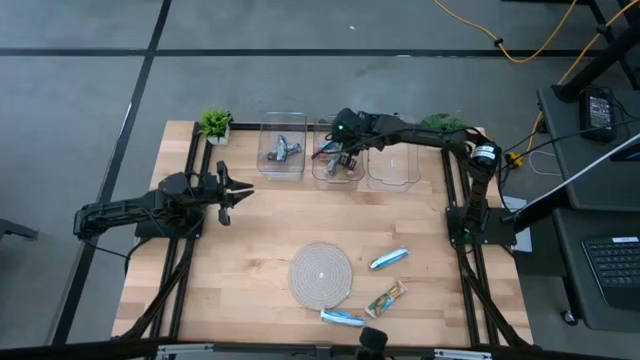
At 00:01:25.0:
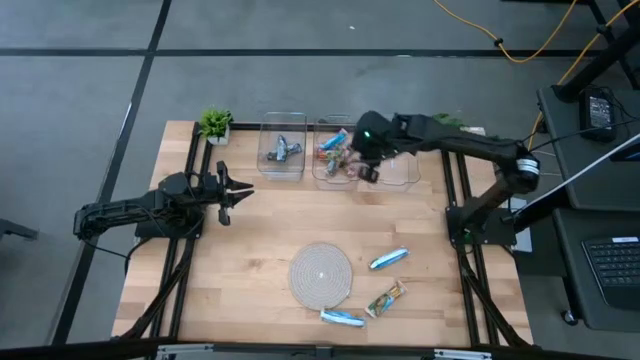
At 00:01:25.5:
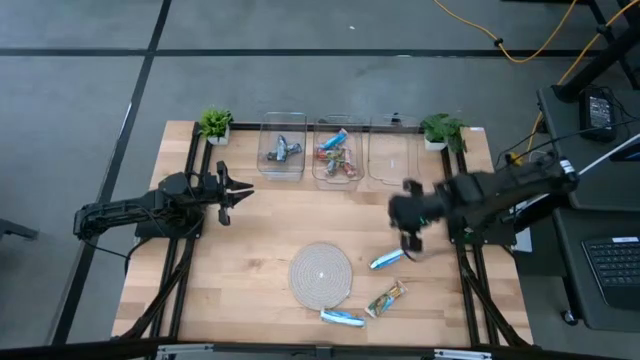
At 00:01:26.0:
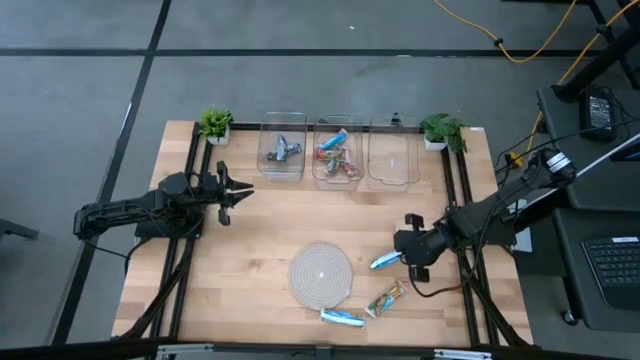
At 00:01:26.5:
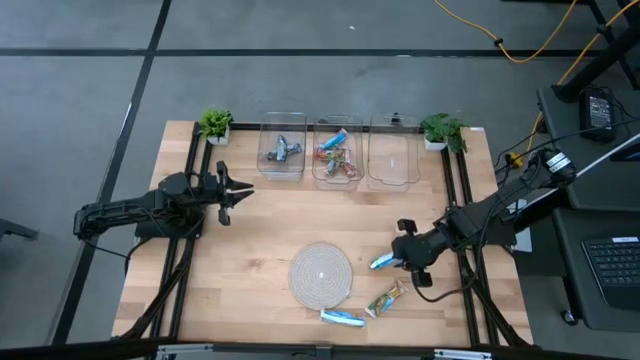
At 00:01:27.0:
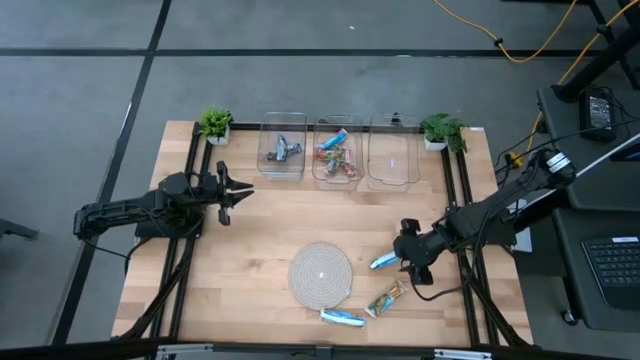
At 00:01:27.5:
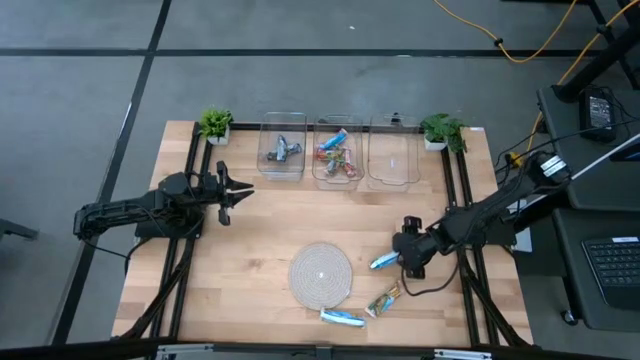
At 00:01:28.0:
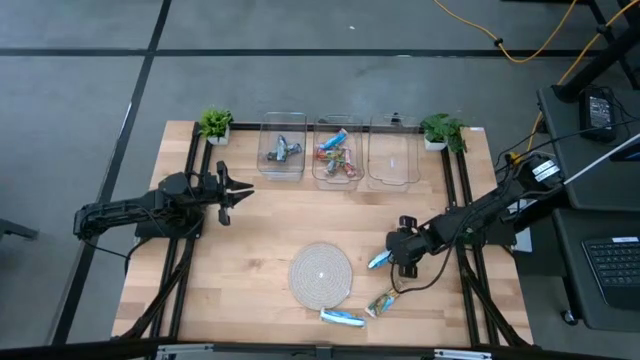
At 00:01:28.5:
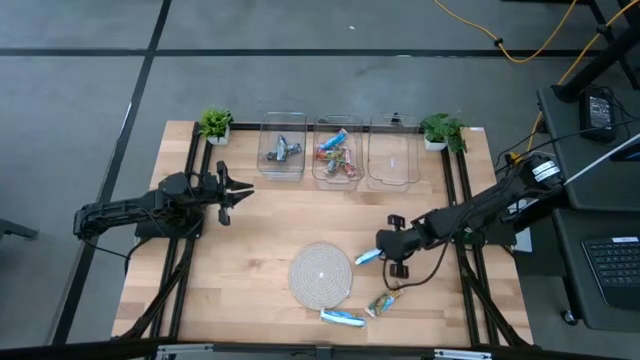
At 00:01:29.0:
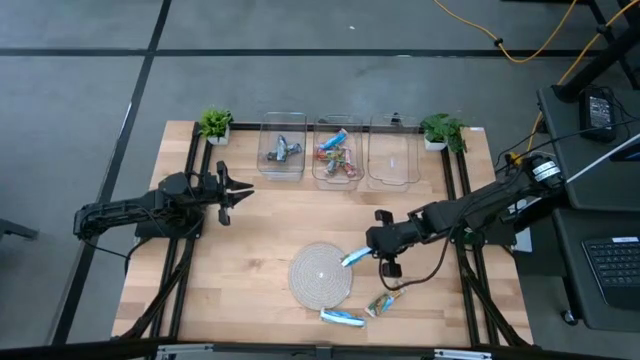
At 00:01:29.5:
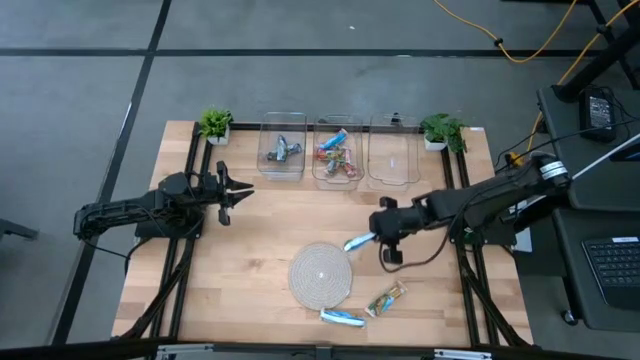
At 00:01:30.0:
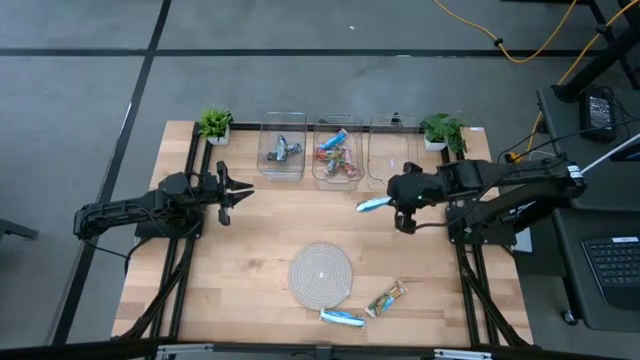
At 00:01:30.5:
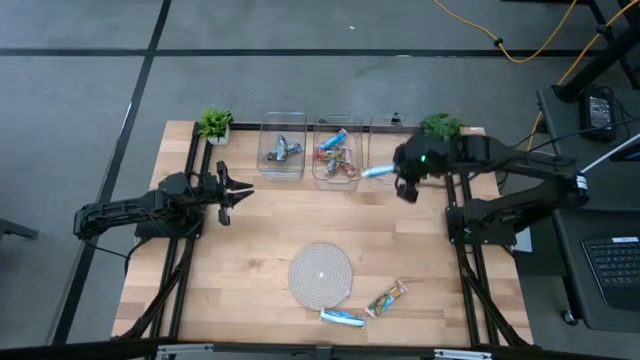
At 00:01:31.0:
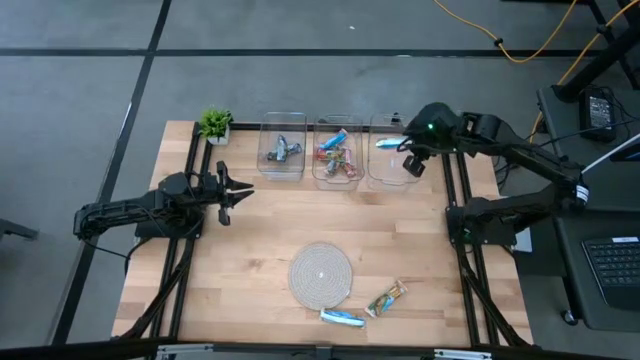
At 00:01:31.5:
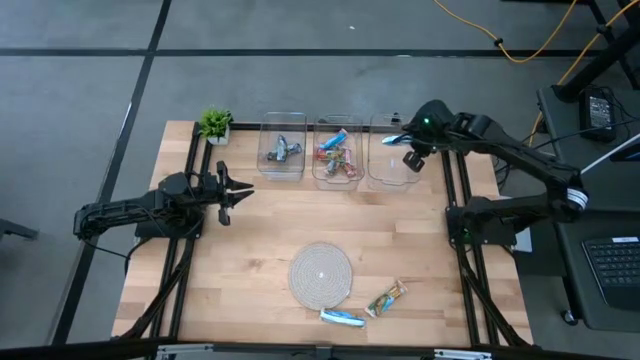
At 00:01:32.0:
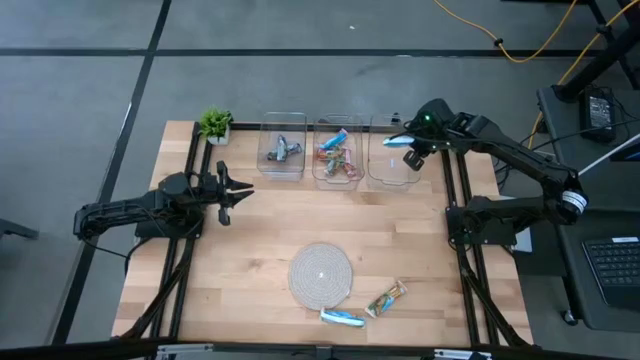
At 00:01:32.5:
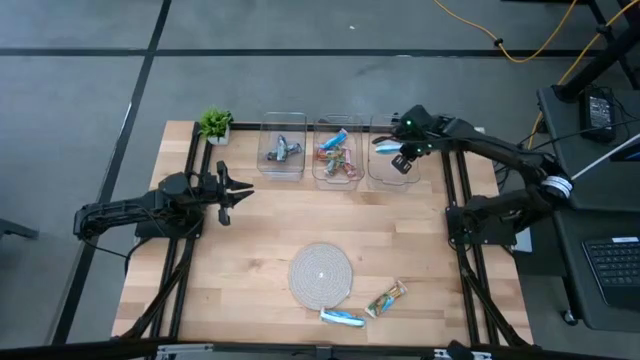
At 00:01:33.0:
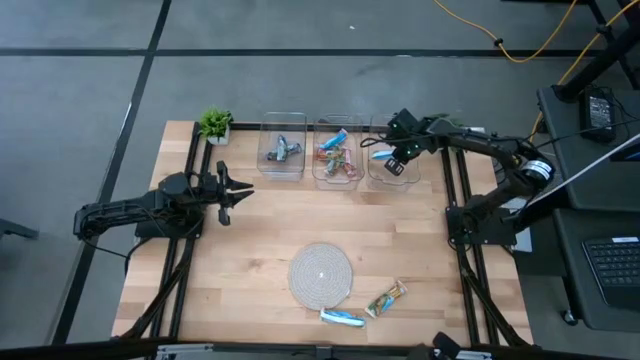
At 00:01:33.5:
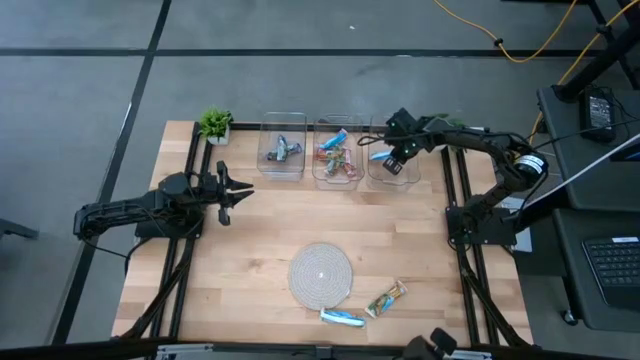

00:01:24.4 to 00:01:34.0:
Task: Pick and place Granola Bars by type
Put the orange granola bar into the right transparent bin

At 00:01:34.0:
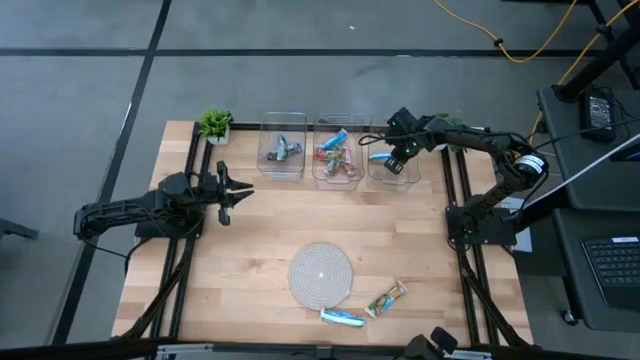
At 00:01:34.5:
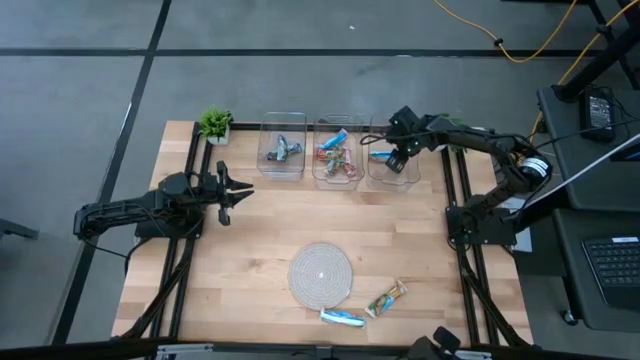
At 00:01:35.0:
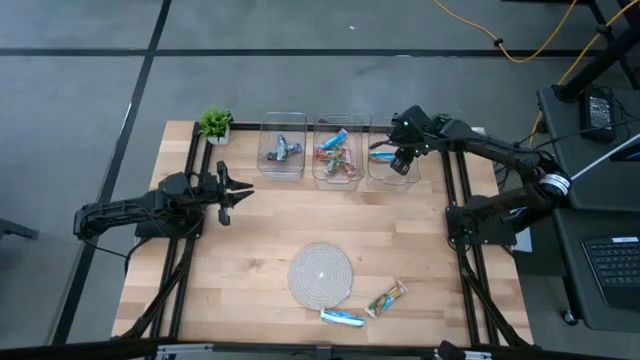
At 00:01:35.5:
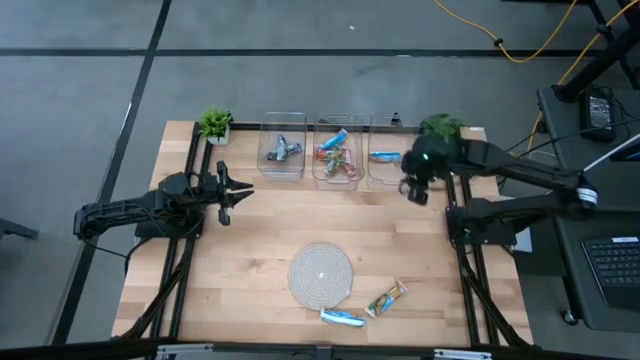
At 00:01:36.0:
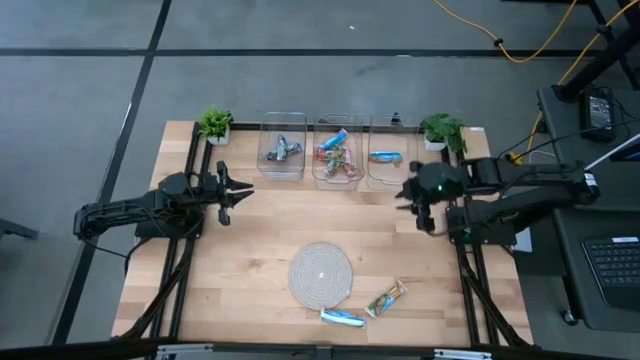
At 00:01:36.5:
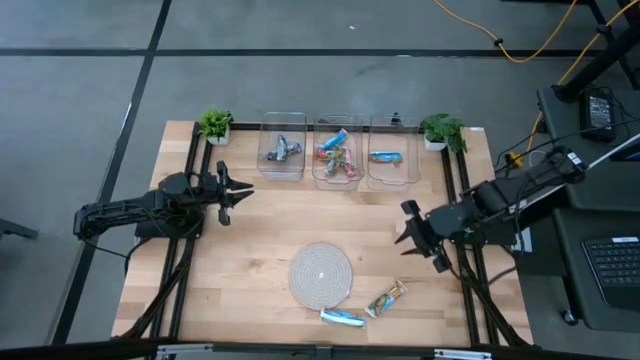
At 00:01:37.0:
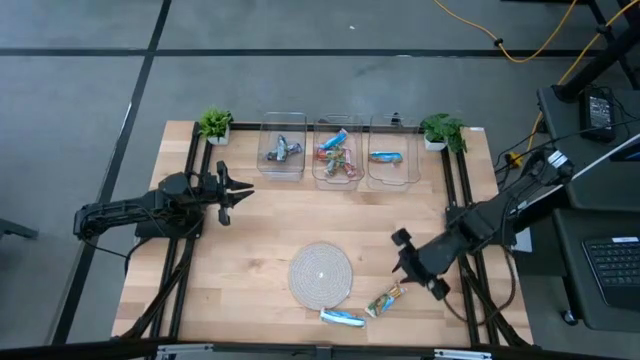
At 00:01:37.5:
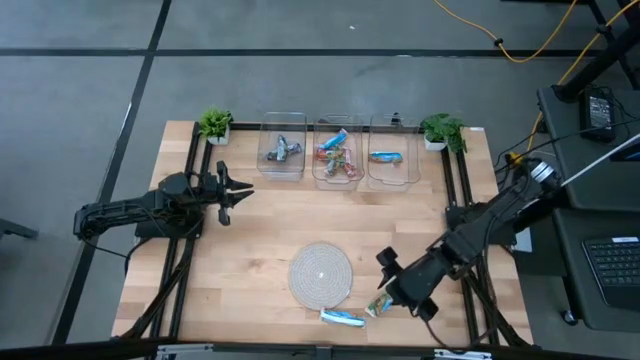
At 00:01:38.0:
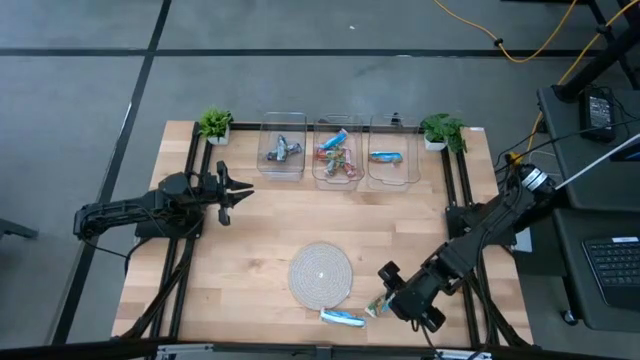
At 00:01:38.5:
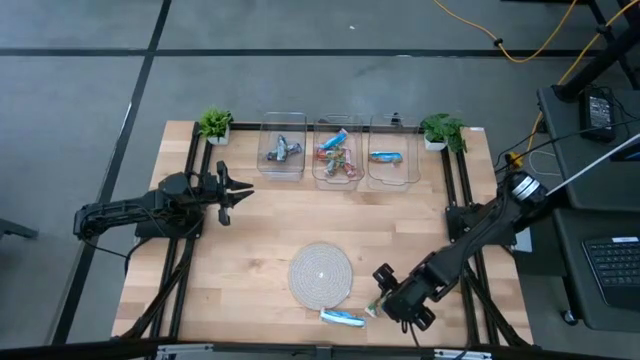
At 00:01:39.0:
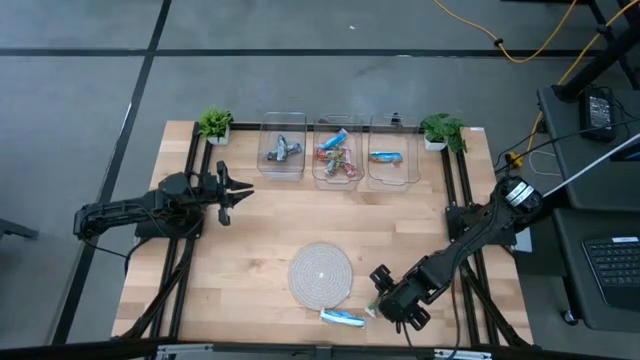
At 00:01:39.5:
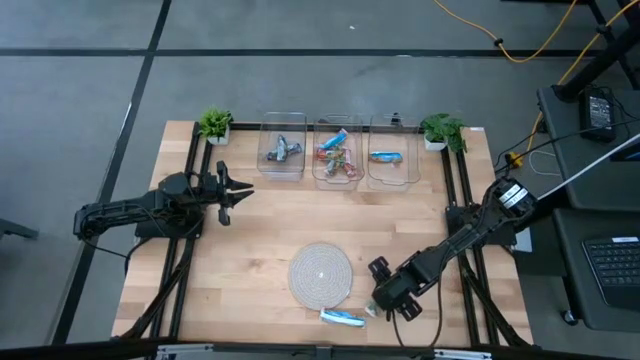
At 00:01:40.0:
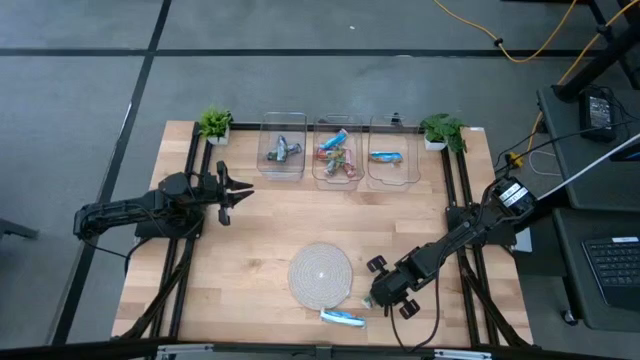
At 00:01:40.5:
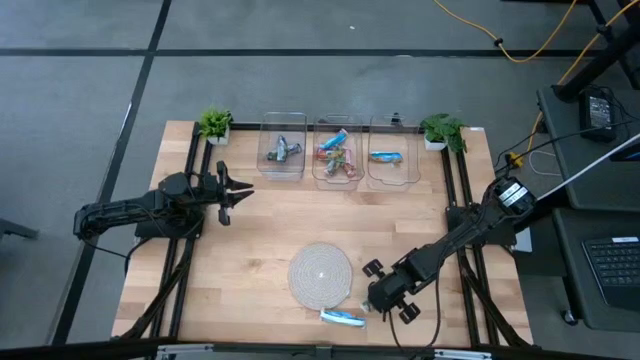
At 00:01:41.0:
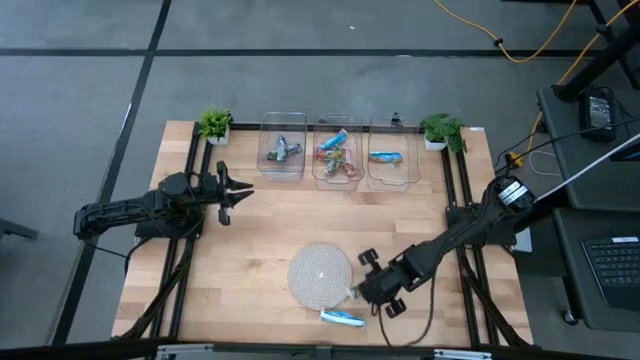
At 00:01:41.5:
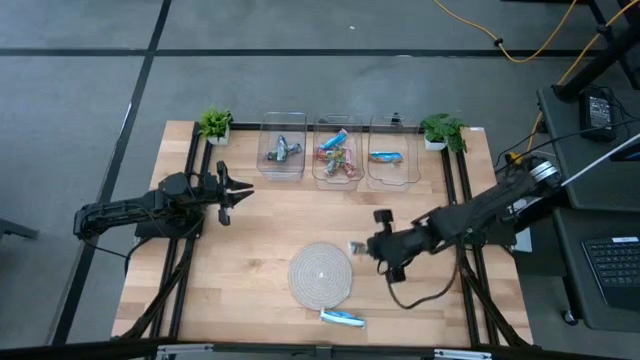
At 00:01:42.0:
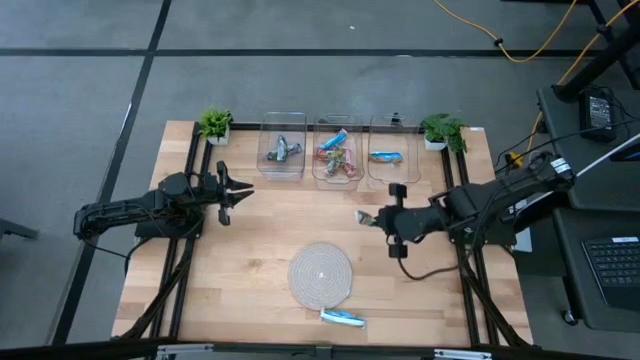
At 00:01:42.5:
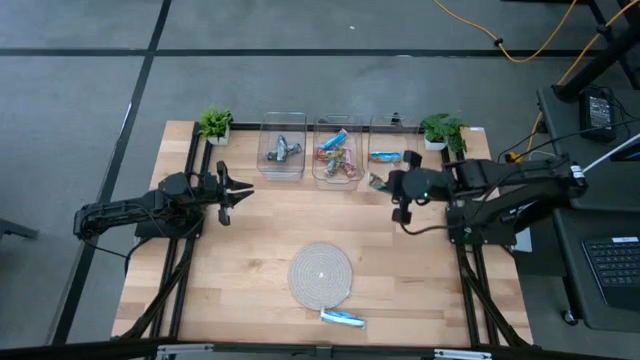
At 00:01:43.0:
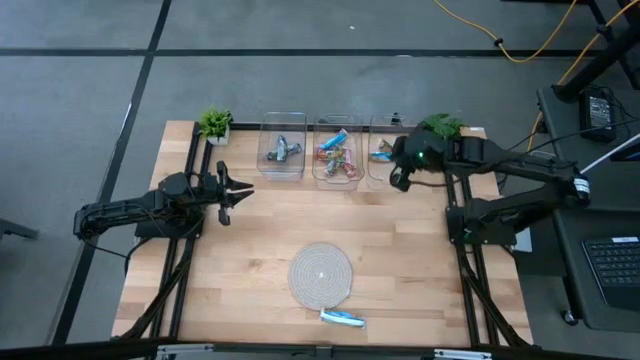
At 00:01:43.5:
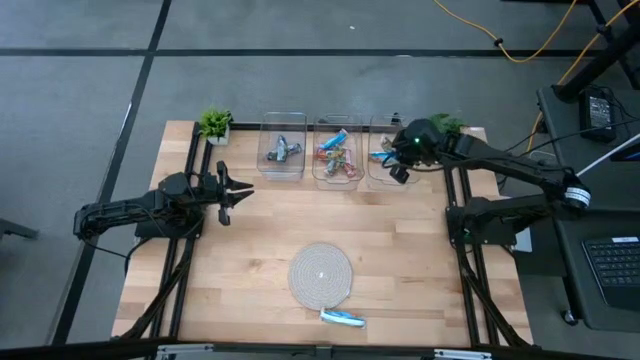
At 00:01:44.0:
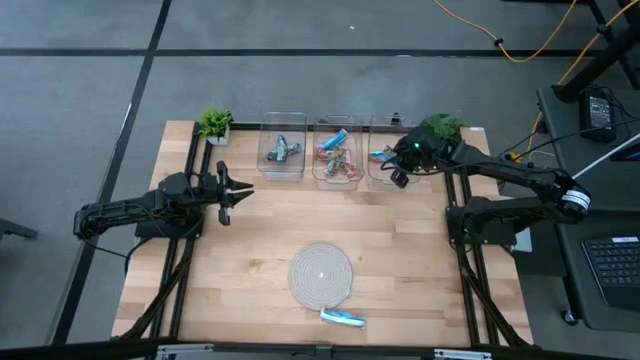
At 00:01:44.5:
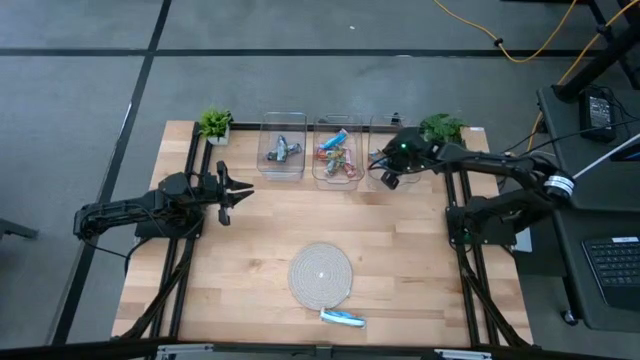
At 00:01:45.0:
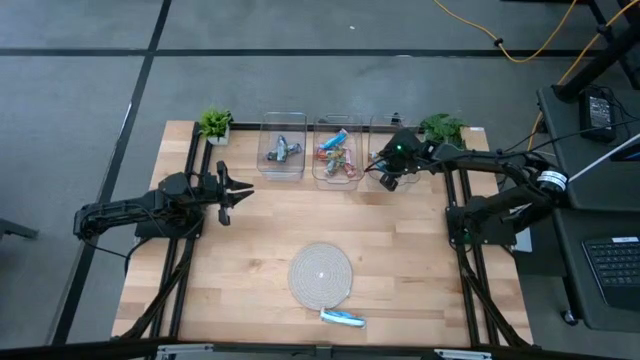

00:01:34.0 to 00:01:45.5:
Put the orange granola bar into the right transparent bin

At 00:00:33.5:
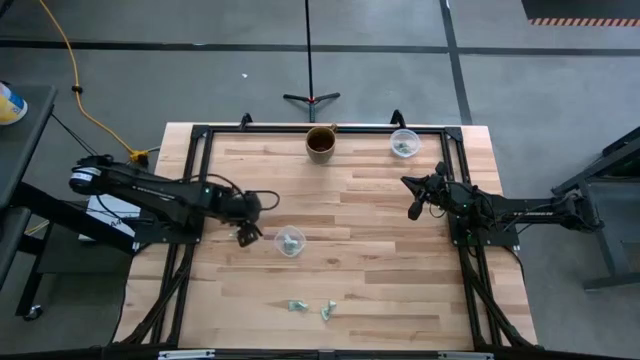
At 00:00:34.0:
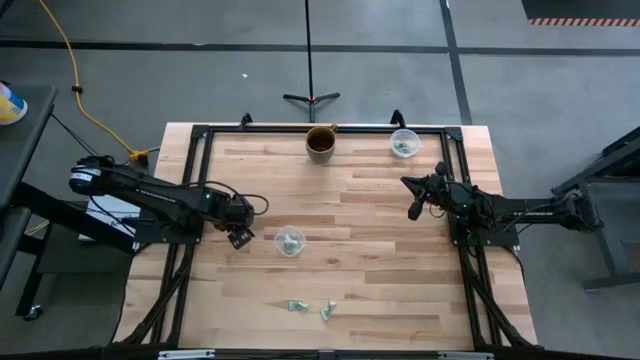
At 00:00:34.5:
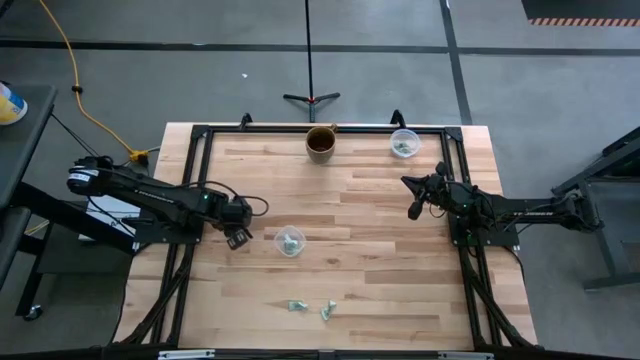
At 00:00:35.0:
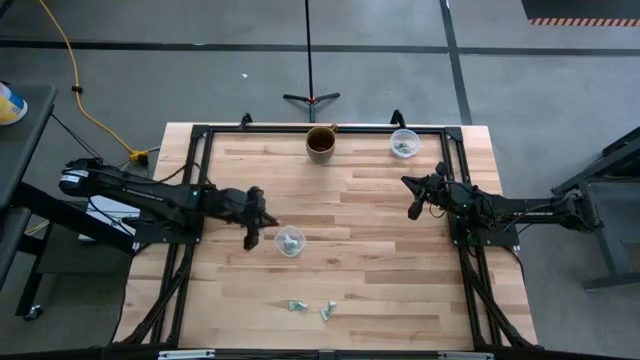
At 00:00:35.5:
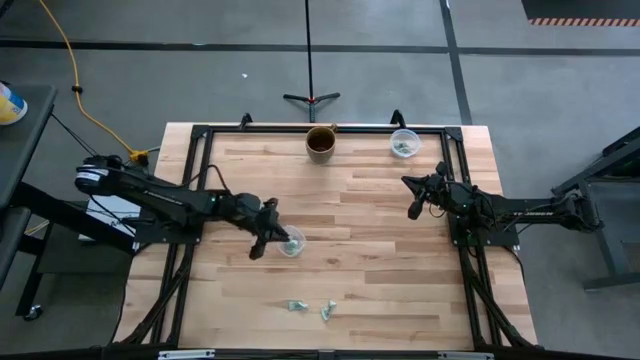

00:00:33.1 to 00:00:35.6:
Task: Pick and place items into bin
Put the stevia packet into the bottom transparent bin
